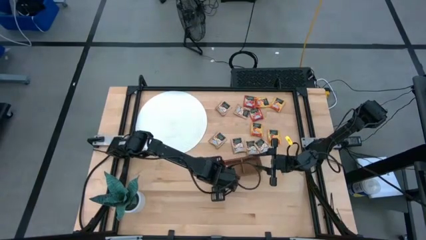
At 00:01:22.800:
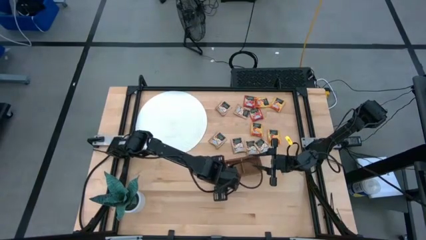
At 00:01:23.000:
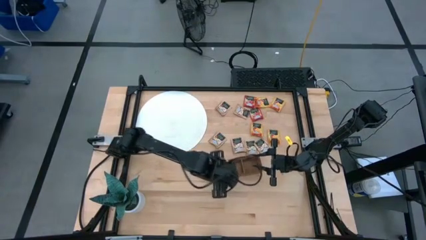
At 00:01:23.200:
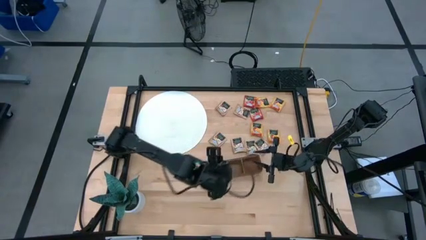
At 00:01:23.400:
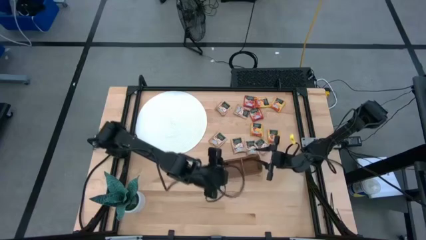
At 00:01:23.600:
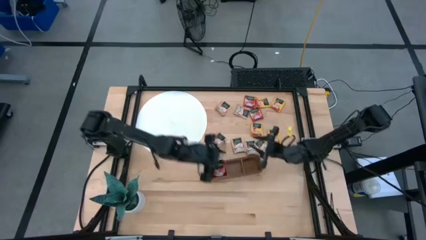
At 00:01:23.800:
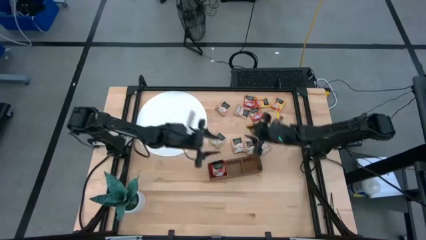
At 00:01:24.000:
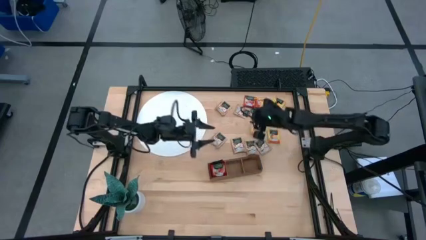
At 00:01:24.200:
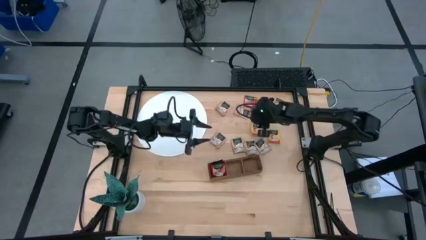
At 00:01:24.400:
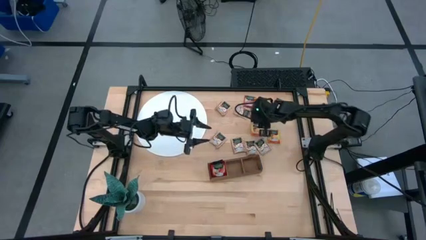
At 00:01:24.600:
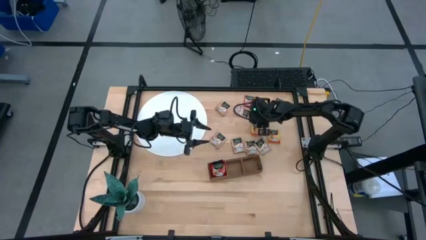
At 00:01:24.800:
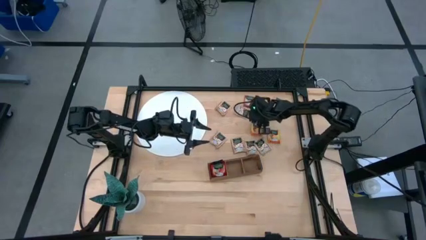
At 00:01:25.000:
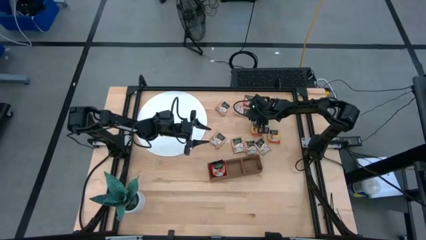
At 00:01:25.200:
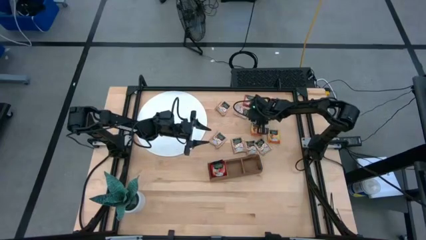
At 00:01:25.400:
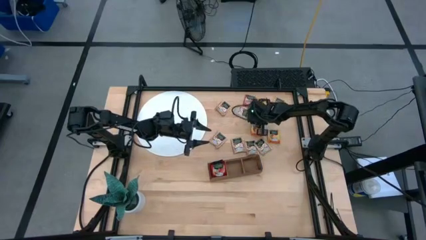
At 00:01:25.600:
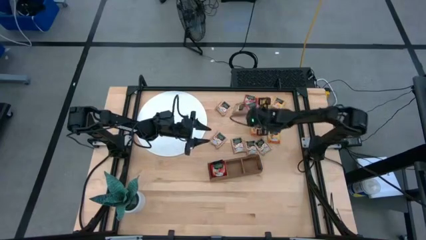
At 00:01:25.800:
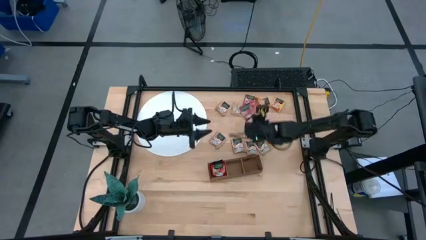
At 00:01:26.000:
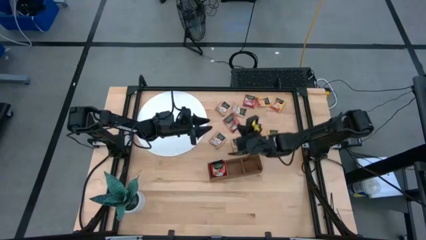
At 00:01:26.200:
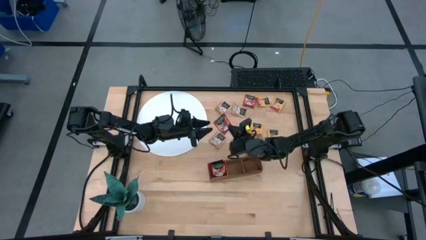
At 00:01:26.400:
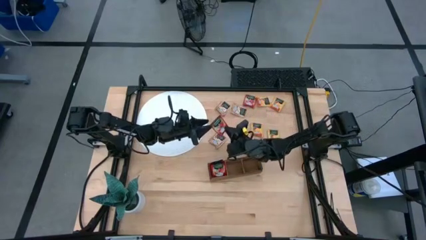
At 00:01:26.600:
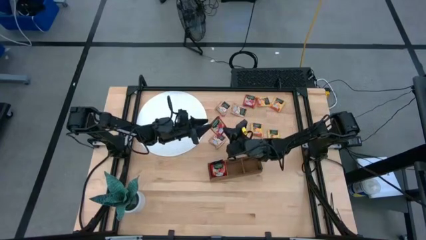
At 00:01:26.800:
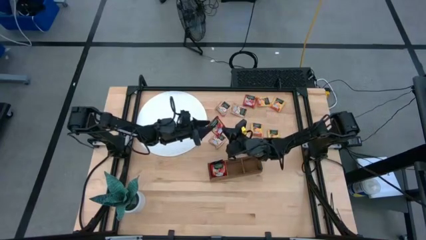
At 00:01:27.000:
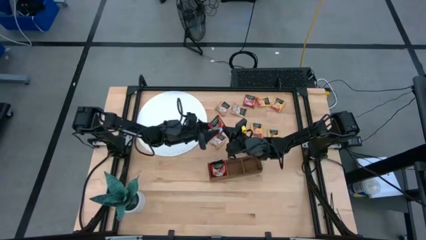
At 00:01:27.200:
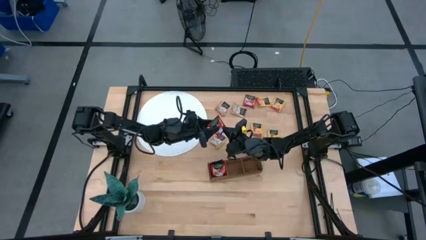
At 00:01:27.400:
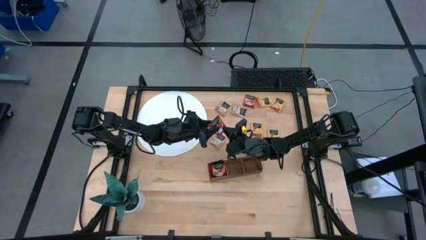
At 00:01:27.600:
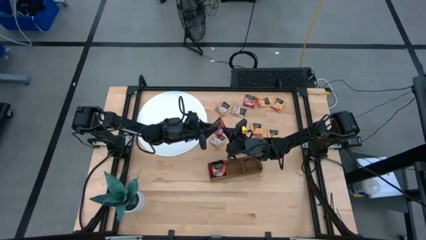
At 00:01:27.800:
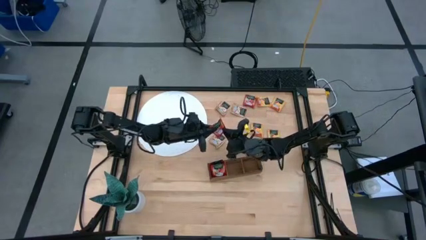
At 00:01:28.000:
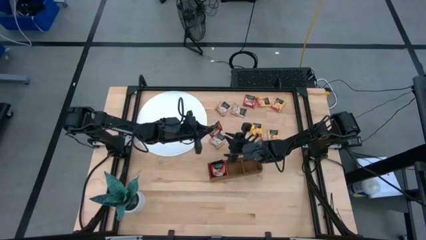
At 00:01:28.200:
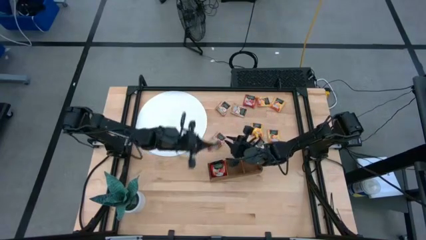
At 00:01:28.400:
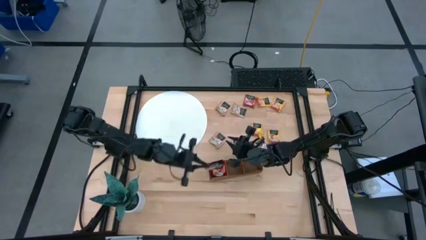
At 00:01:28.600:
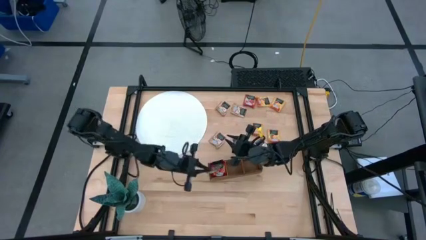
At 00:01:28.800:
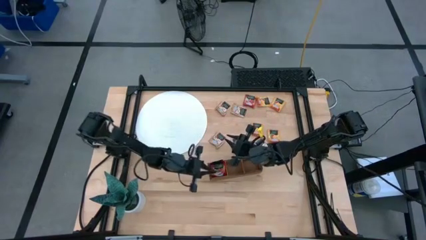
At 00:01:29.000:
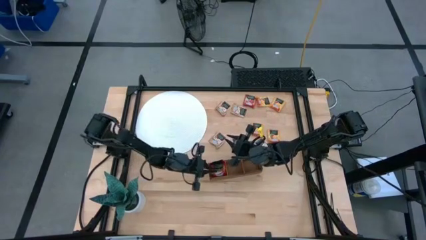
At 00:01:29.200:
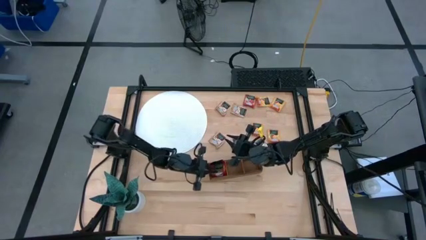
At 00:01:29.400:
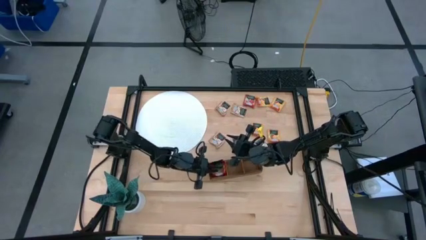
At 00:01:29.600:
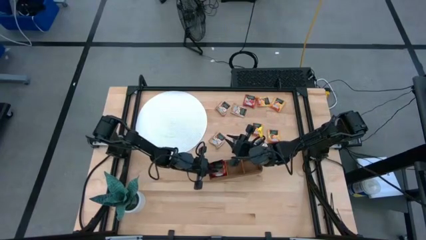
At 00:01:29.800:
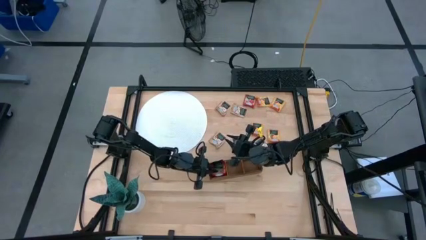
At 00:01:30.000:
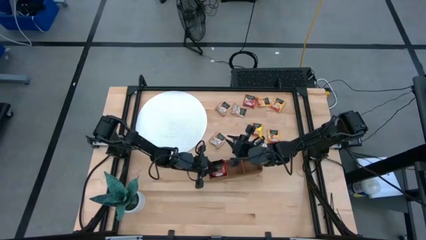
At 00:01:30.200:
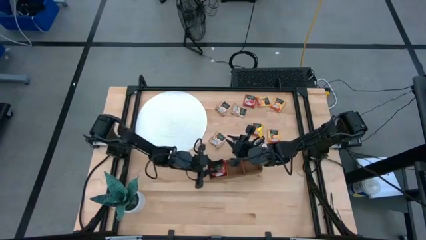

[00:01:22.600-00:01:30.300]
Task: Pick & Place Tea
Put the red tea bag into the left section of the wooden organizer

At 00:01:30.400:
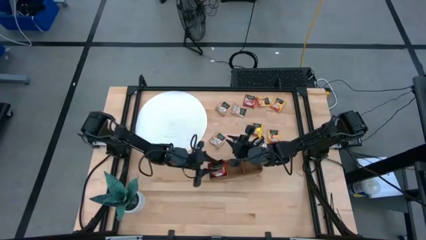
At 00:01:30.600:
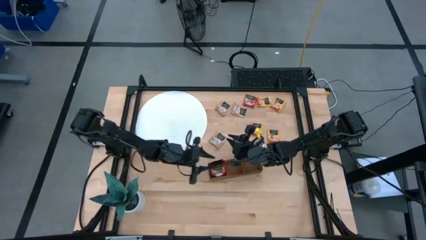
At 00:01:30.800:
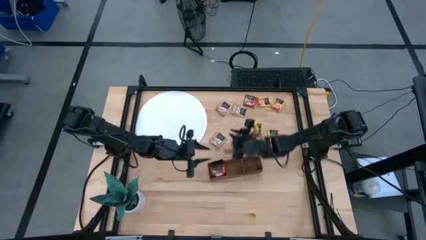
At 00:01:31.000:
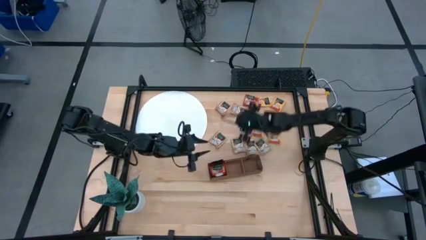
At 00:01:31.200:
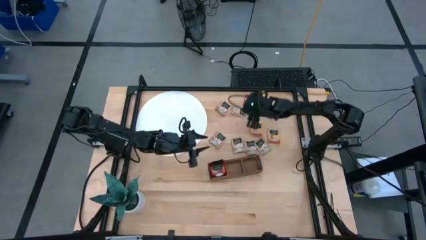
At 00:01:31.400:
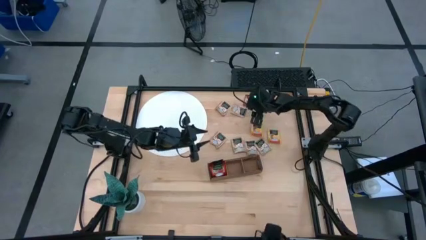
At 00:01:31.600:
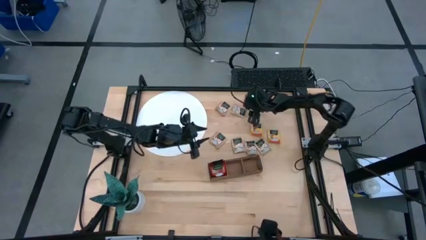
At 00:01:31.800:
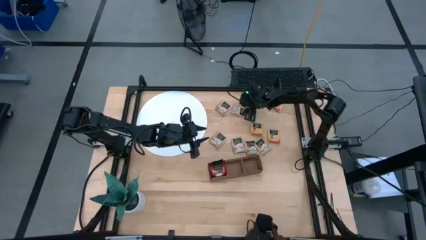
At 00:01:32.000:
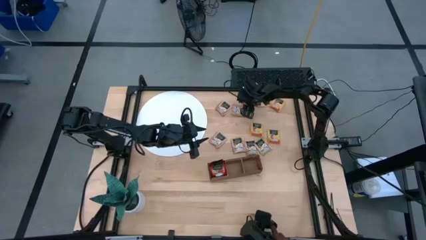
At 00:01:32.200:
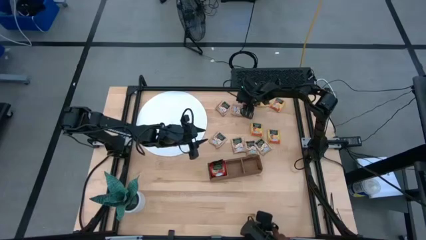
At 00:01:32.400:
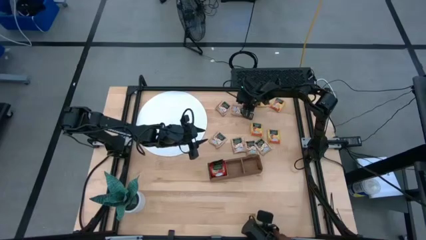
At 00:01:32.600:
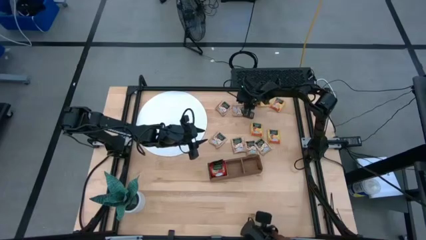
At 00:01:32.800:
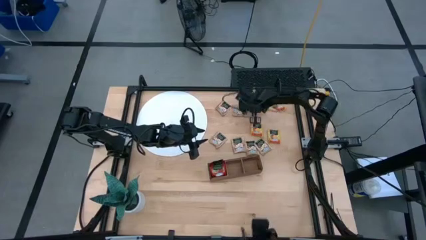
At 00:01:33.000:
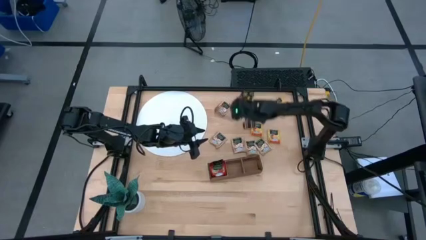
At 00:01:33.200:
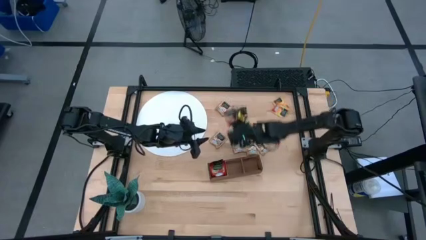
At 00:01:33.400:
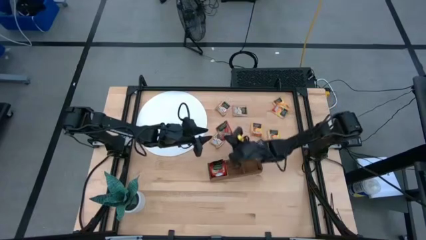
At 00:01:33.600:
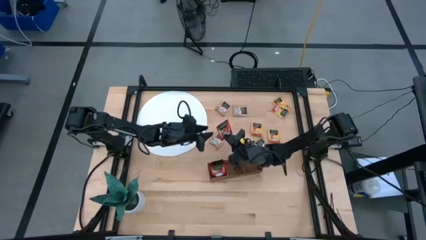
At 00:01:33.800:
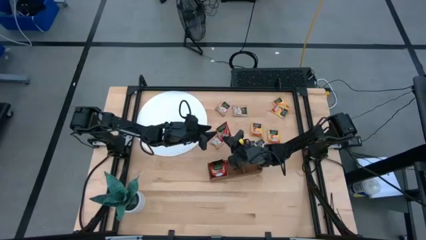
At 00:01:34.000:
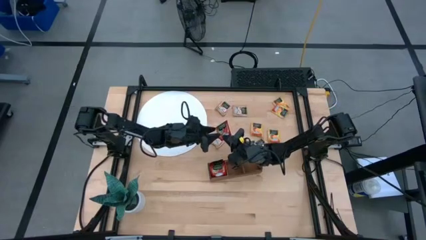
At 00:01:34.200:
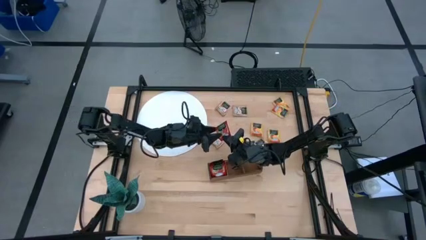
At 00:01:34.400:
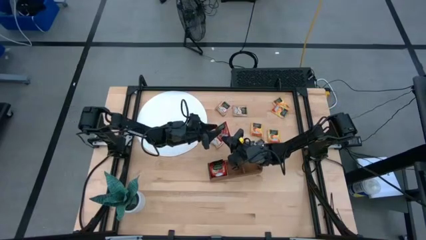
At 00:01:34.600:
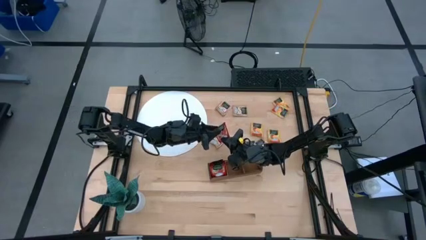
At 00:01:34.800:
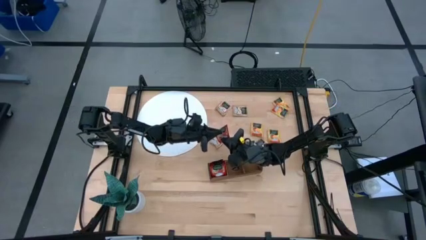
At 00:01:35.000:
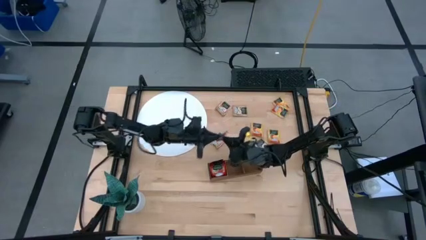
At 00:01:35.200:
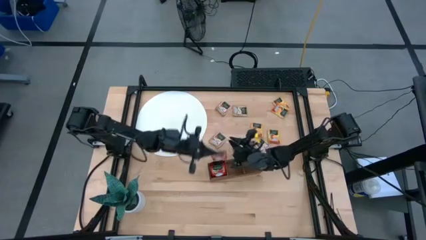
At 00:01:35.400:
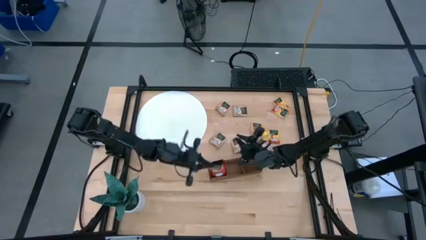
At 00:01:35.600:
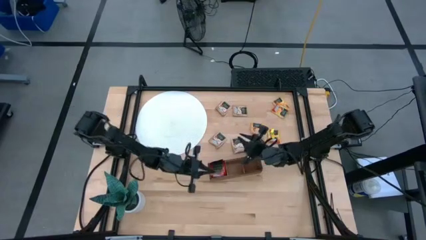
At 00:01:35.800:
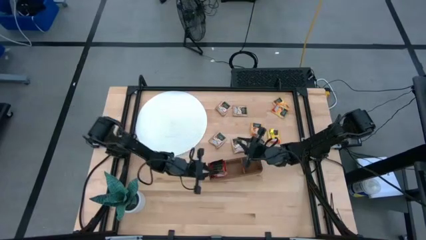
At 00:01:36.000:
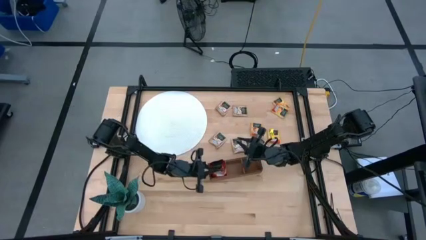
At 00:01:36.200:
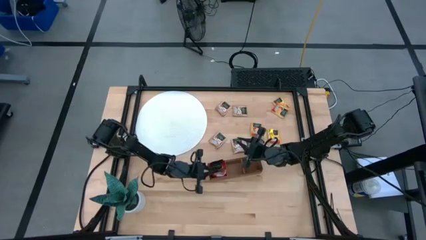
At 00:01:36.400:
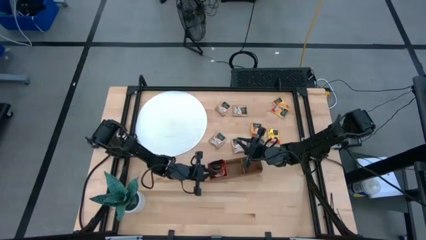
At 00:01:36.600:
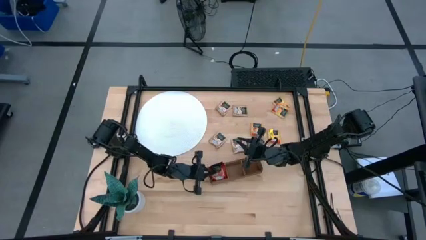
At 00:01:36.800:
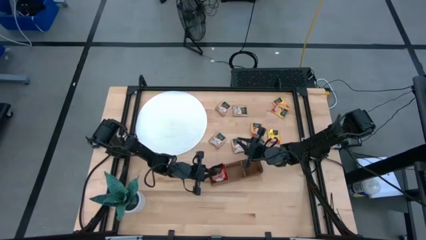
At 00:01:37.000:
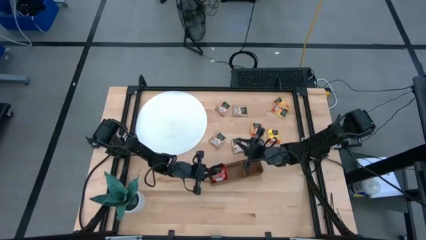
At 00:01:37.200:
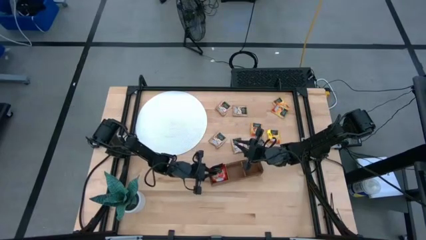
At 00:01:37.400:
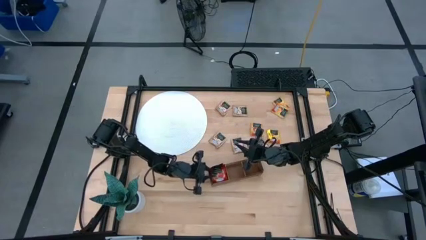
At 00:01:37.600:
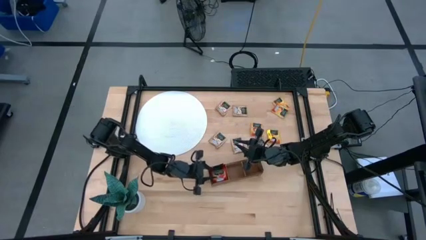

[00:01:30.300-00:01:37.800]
Put the red tea bag into the left section of the wooden organizer

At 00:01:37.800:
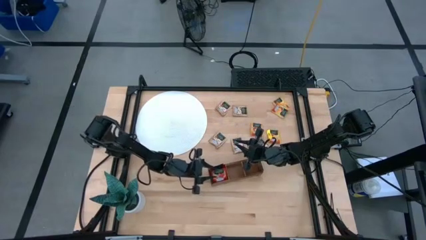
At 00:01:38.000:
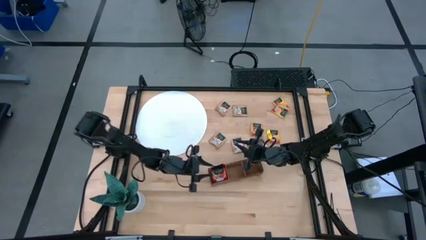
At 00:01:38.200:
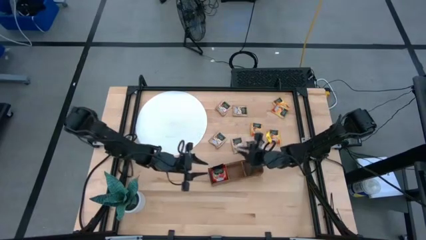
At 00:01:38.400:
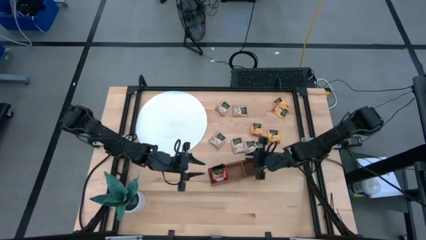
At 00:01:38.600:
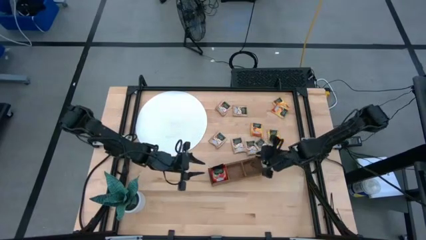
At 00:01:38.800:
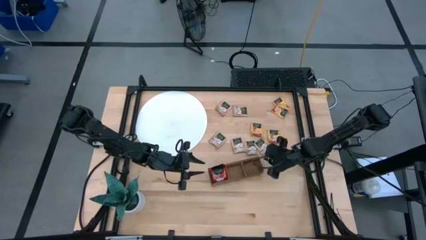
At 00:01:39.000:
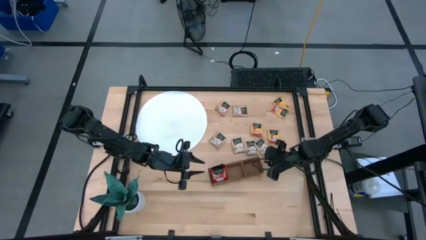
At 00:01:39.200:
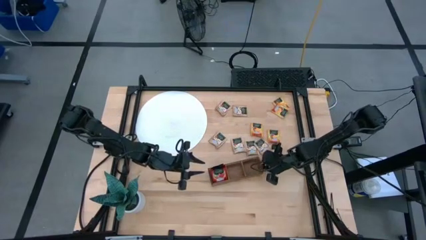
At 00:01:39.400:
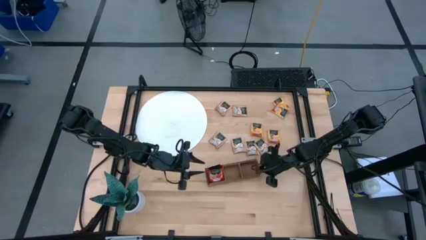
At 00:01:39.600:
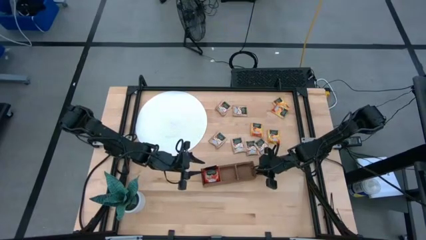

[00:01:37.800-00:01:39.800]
Adjust the wooden organizer
